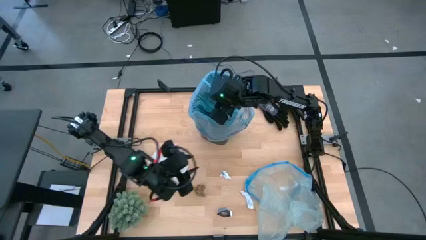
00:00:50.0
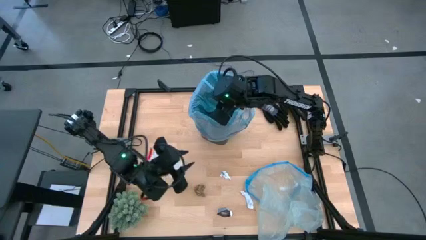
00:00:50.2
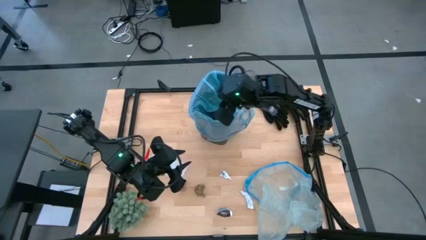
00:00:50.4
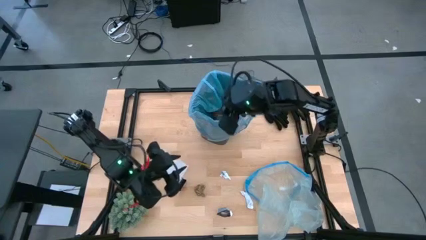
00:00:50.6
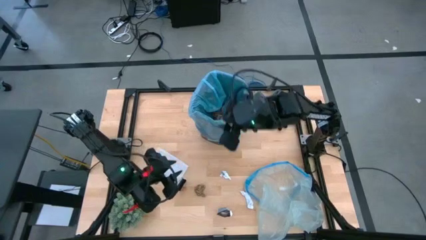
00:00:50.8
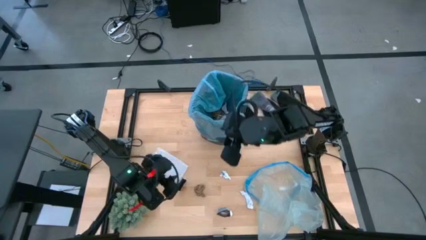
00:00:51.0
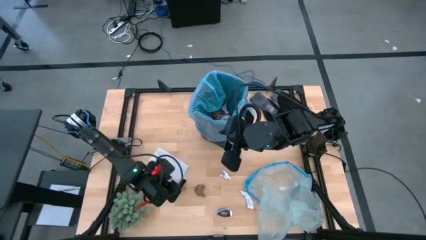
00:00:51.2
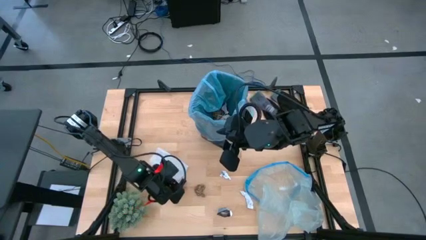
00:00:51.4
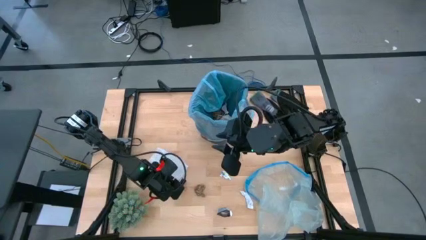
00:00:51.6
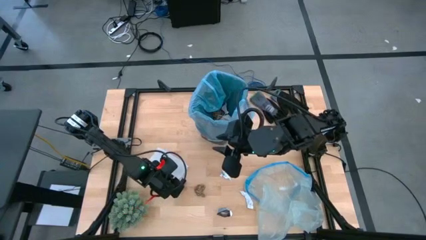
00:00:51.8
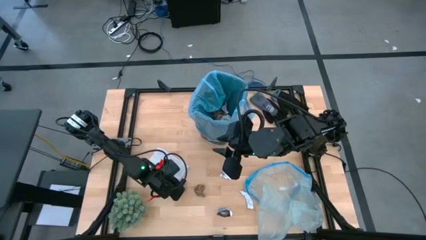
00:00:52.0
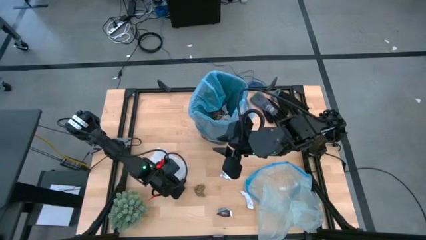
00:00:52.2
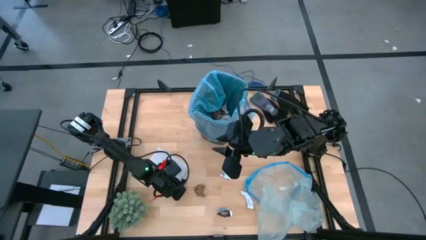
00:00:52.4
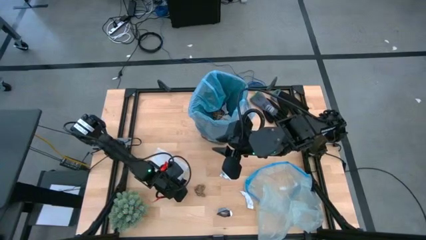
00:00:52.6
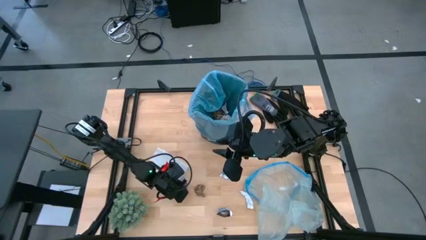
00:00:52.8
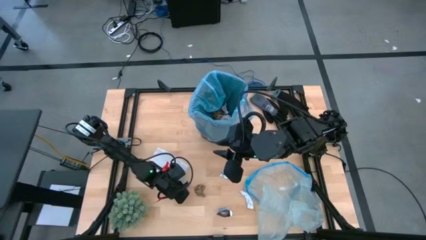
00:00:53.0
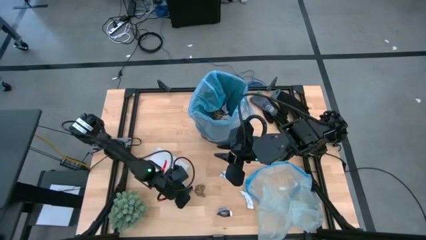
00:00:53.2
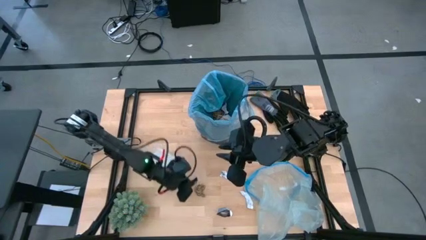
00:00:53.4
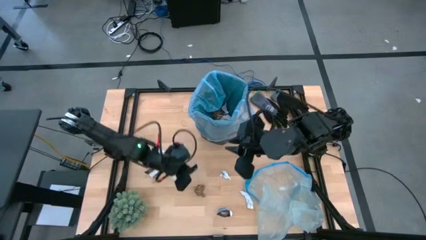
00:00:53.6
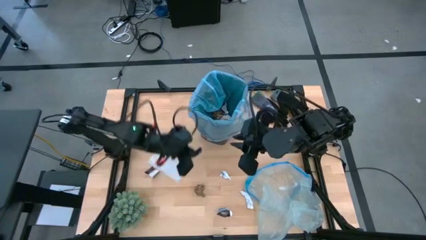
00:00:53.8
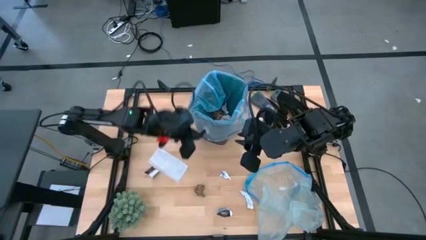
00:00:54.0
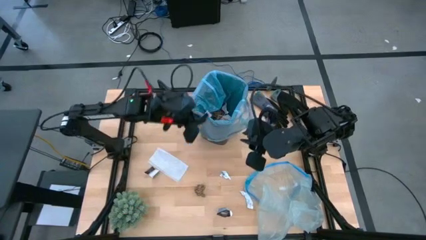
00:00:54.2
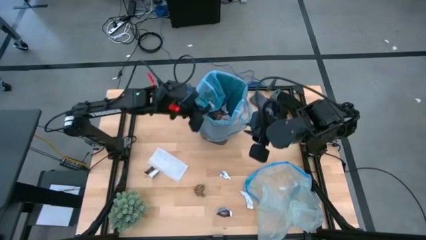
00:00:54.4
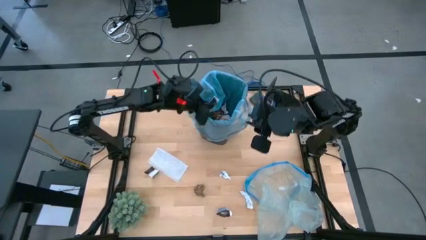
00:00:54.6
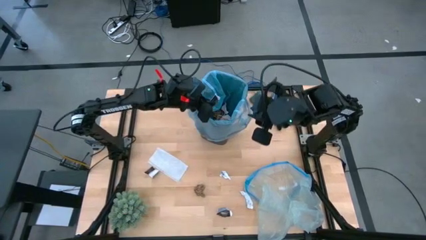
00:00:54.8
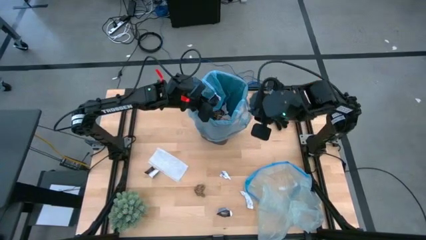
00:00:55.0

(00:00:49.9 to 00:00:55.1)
Task: place trash/remove bag and relplace
Put the plastic wrapper into the trash bin

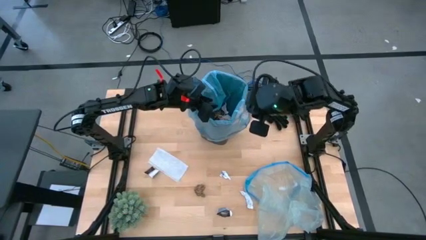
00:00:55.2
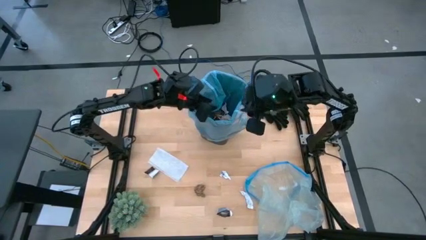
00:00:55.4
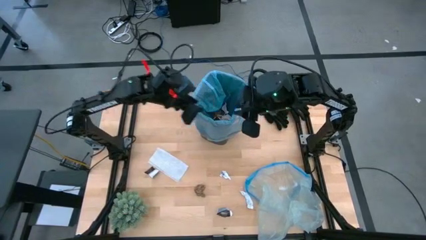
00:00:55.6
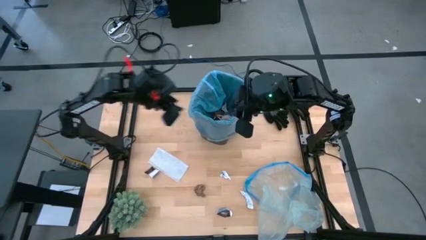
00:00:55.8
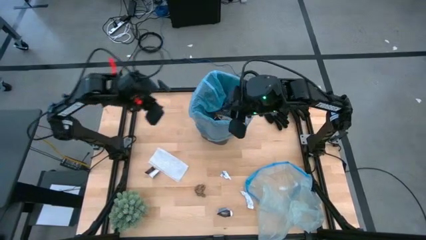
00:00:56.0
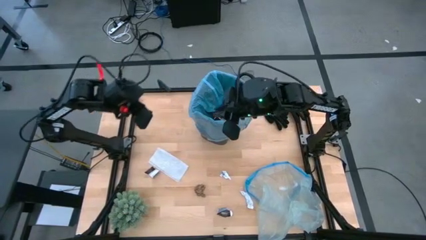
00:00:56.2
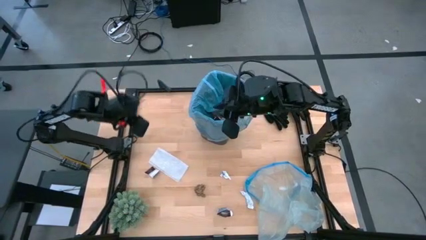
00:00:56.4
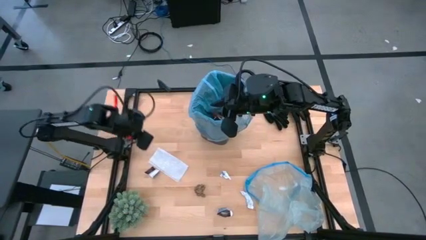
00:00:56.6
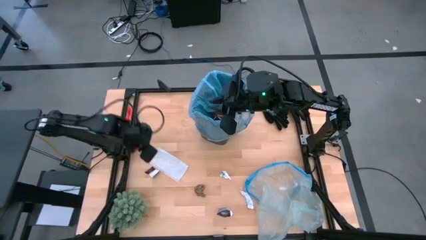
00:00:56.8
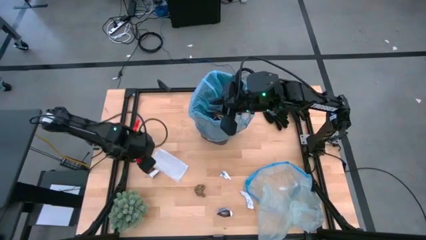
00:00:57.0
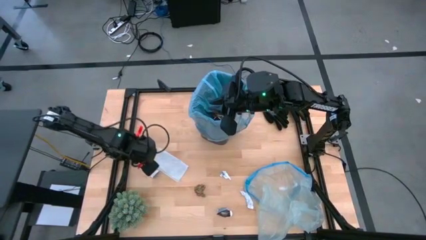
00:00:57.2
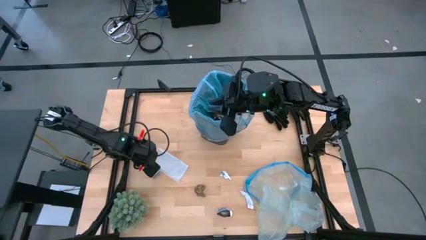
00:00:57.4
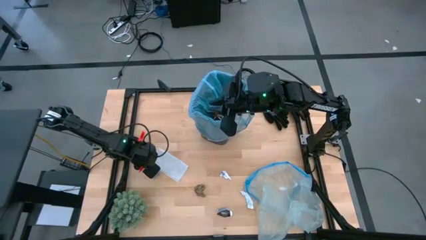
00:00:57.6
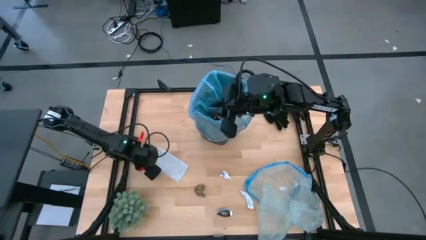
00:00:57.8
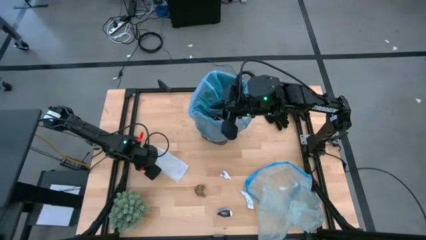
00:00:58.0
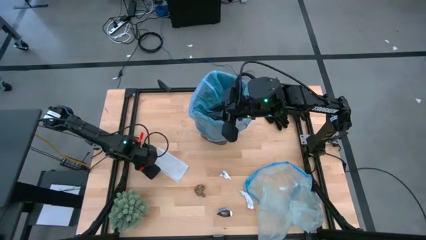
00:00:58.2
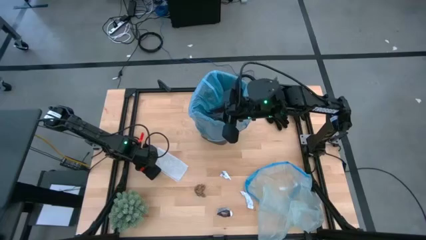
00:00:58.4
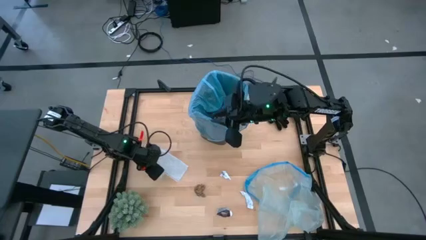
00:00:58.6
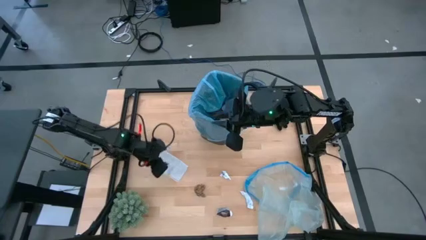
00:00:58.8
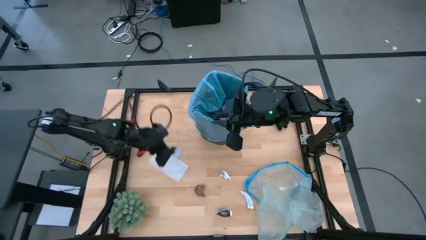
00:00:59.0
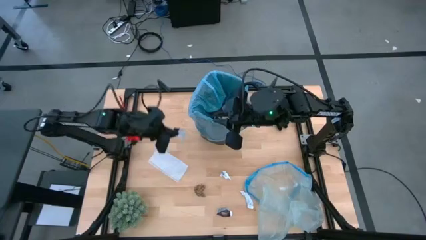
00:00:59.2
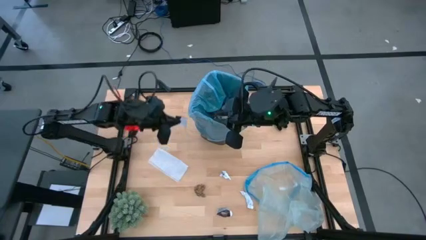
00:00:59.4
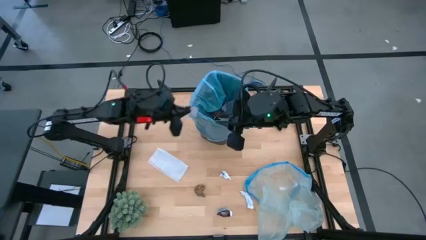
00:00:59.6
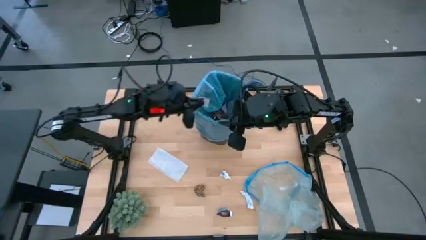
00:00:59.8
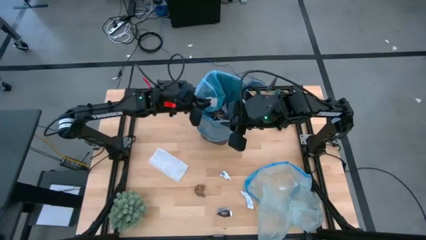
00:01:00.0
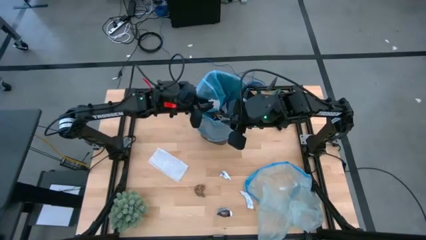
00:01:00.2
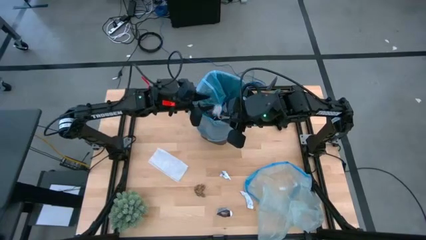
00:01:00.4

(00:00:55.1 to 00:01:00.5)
Put the plastic wrapper into the trash bin

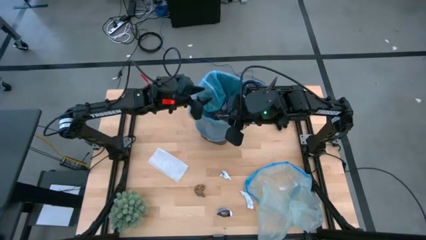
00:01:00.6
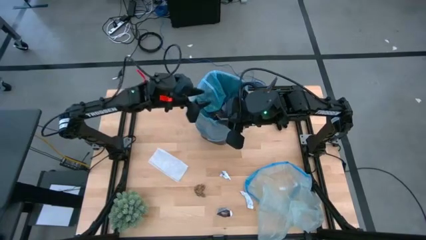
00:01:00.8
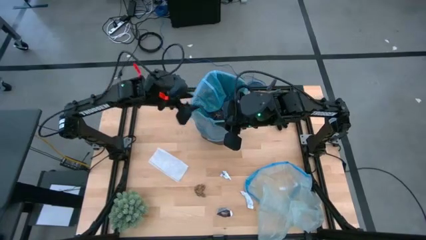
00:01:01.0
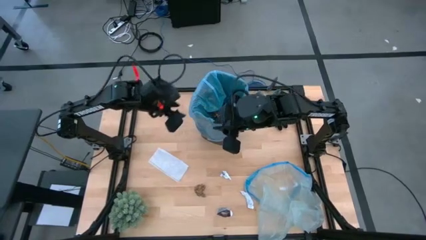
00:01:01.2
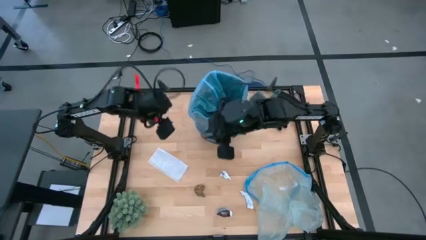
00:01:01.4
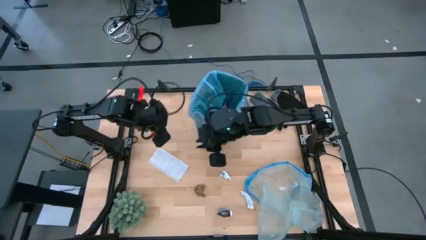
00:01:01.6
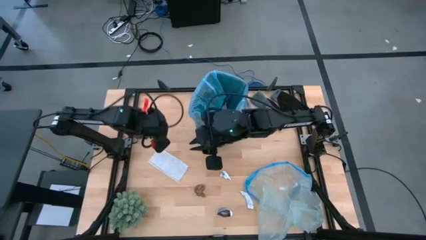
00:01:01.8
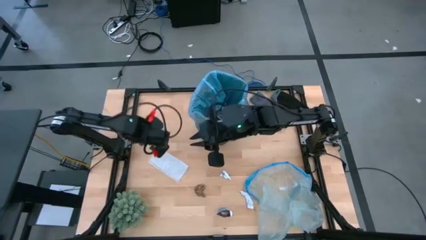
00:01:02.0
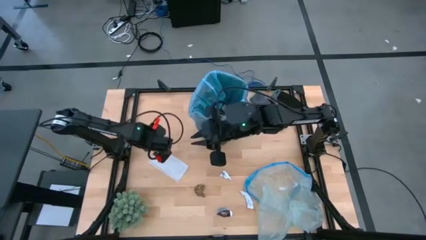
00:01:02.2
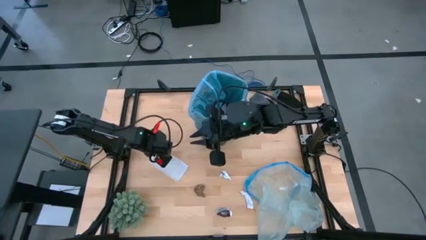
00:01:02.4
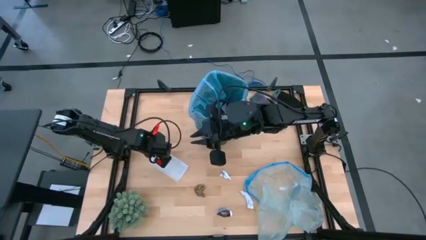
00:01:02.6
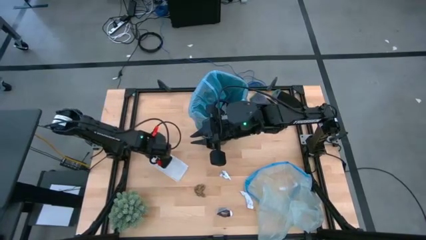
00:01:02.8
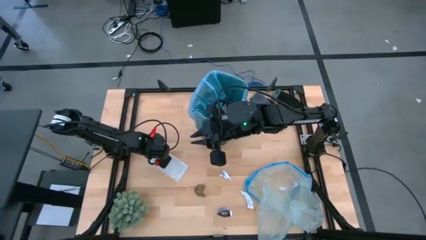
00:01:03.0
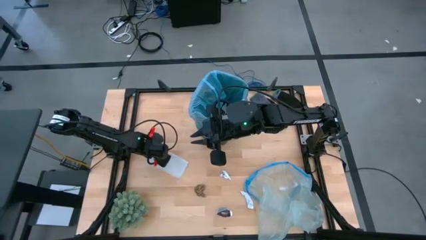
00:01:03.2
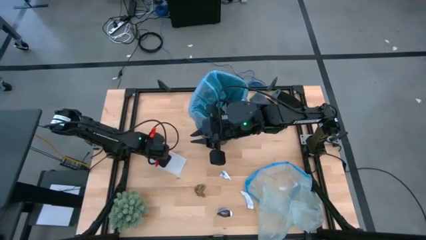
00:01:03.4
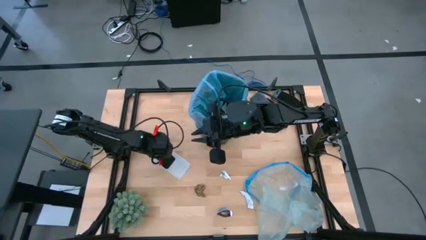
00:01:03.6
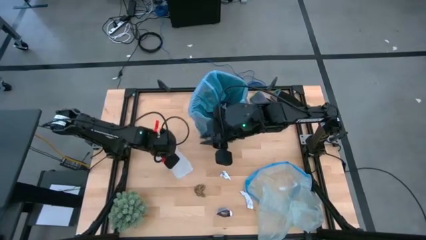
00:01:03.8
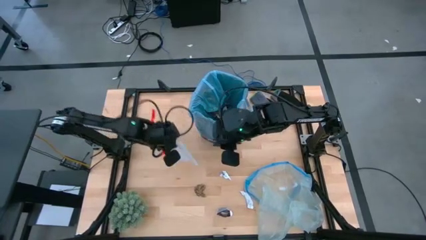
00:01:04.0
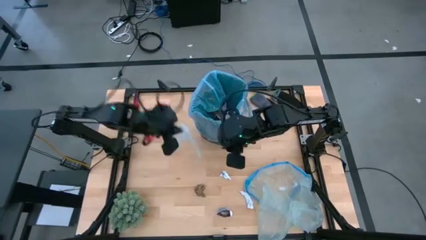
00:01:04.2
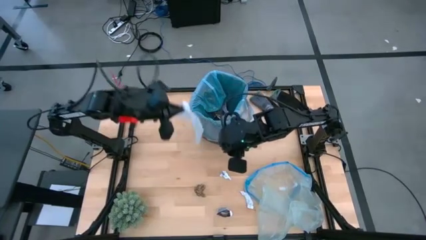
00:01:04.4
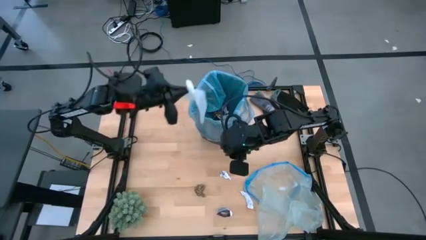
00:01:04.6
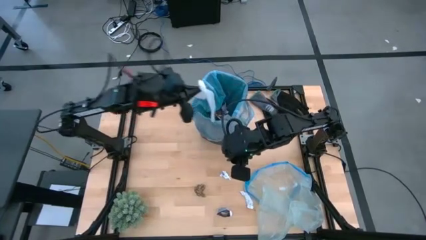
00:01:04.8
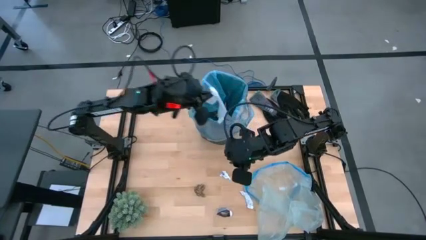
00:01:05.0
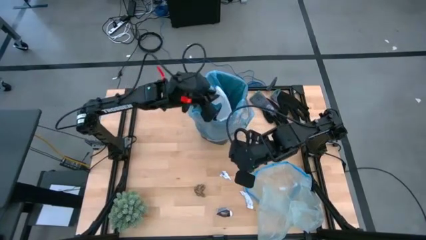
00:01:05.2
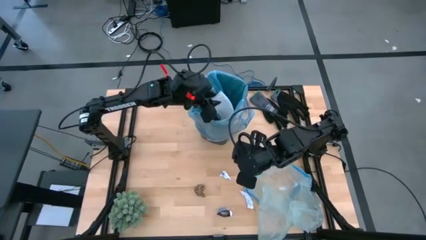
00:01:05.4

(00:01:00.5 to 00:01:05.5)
Put the white wipes into the trash bin

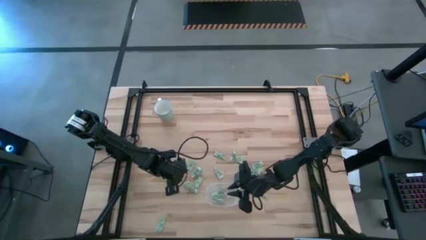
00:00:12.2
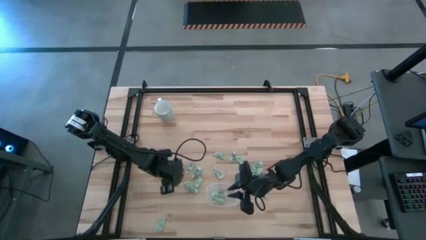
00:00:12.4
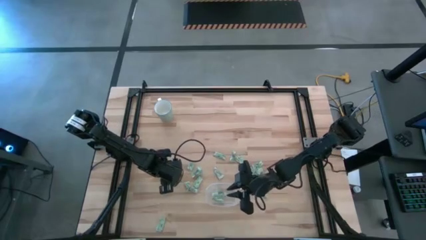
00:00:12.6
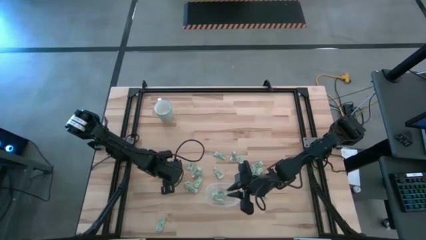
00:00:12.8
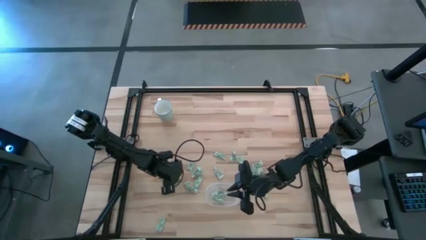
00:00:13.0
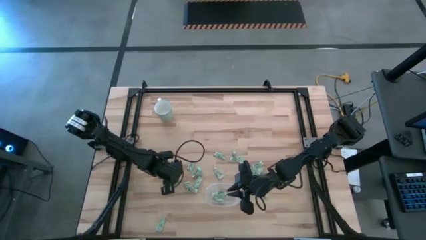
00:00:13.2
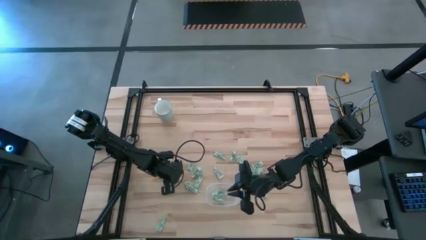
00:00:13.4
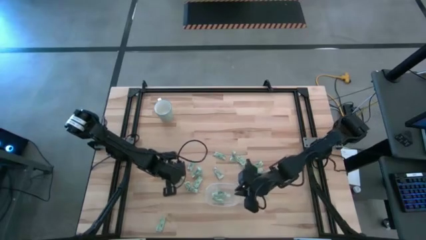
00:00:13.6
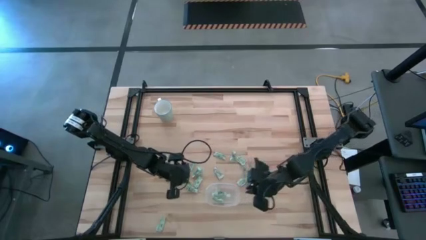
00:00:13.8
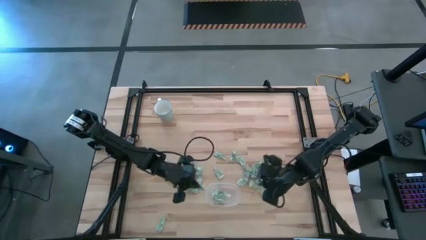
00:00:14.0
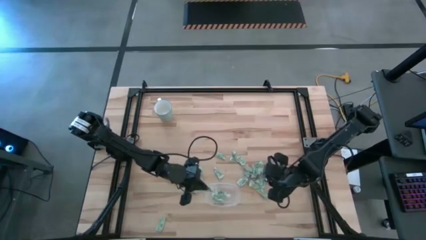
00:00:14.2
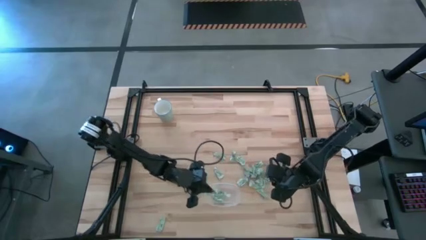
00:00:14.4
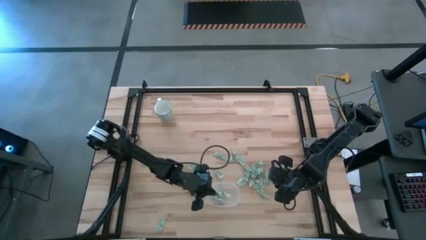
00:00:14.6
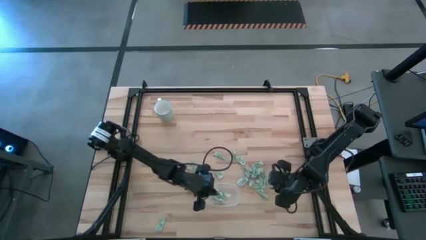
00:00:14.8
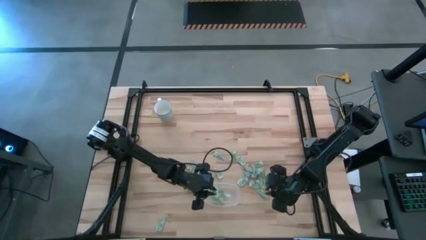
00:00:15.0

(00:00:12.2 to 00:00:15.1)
Task: Pick and place Stevia / Truvia into bins
Put the stevia packet into the transparent container
